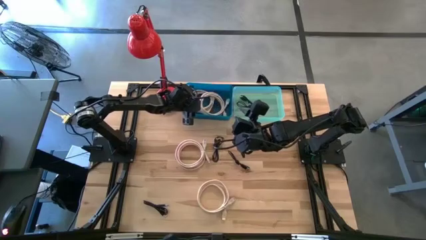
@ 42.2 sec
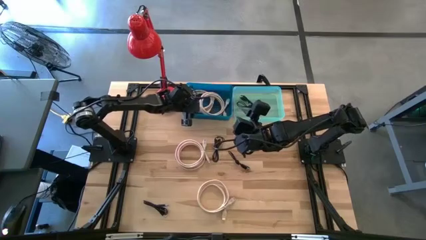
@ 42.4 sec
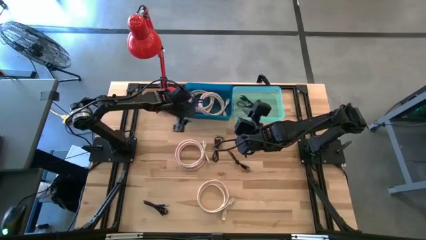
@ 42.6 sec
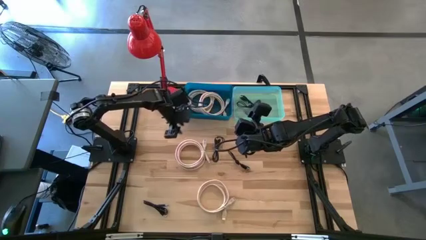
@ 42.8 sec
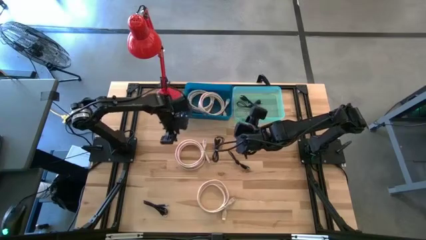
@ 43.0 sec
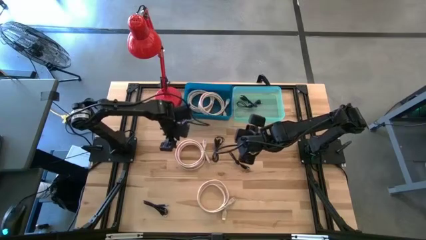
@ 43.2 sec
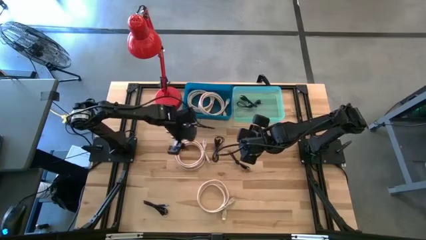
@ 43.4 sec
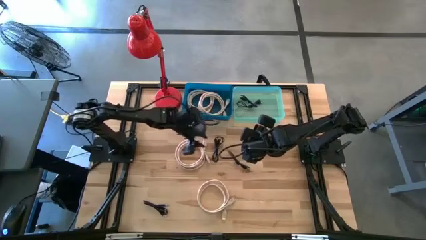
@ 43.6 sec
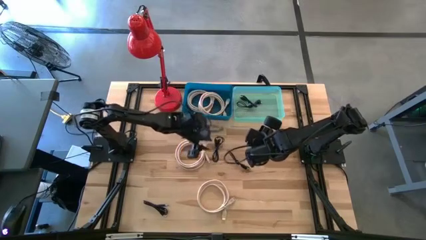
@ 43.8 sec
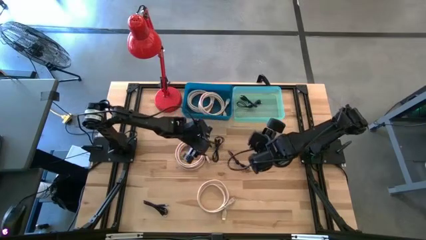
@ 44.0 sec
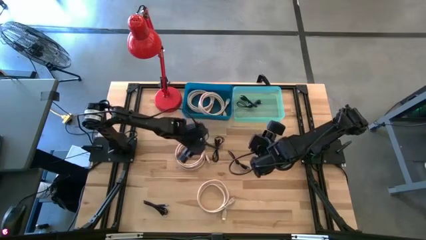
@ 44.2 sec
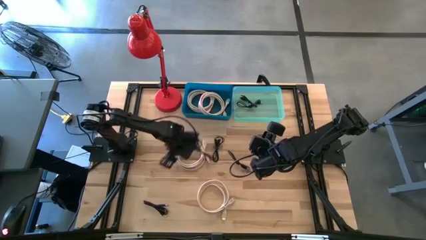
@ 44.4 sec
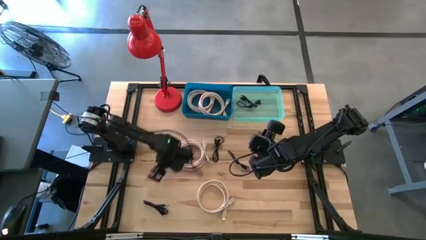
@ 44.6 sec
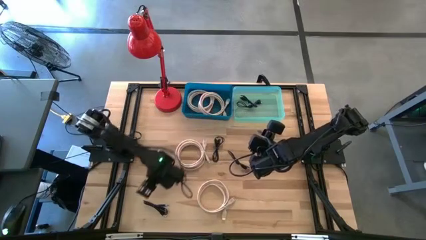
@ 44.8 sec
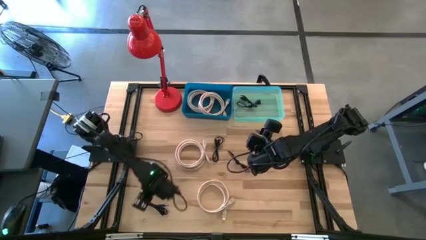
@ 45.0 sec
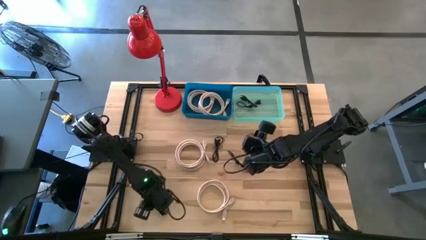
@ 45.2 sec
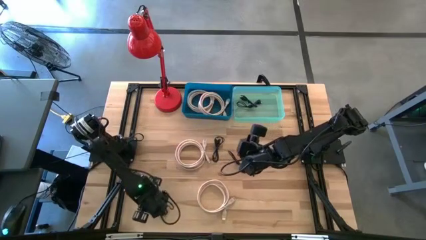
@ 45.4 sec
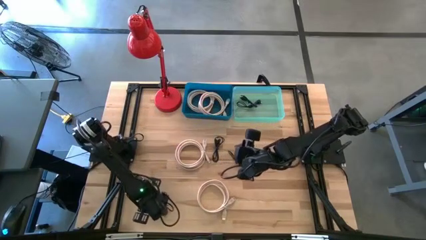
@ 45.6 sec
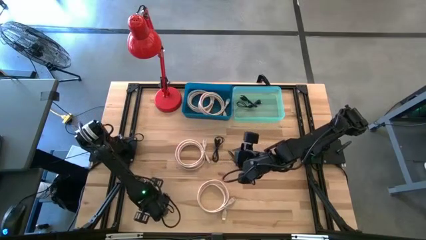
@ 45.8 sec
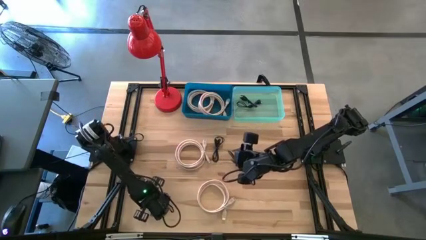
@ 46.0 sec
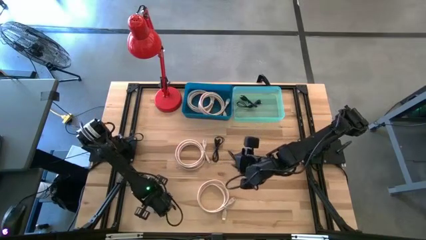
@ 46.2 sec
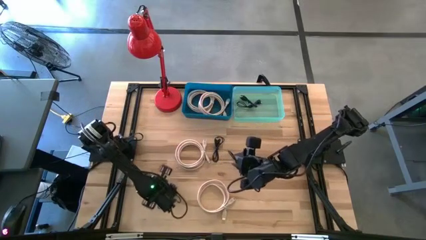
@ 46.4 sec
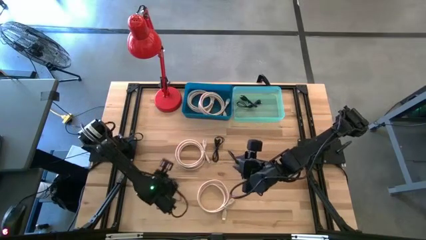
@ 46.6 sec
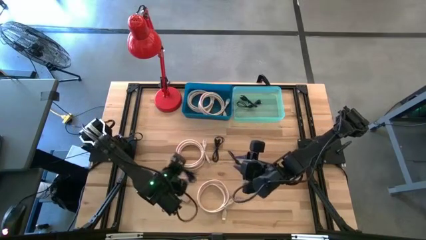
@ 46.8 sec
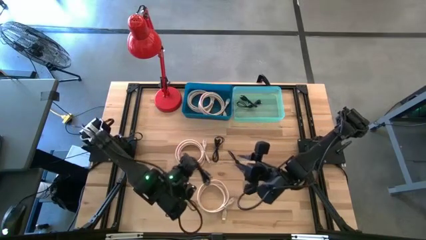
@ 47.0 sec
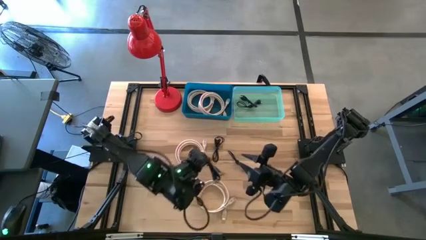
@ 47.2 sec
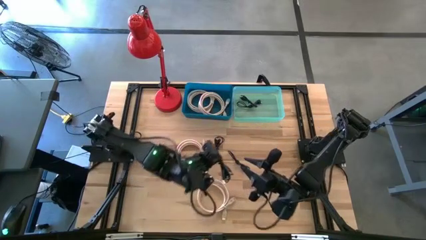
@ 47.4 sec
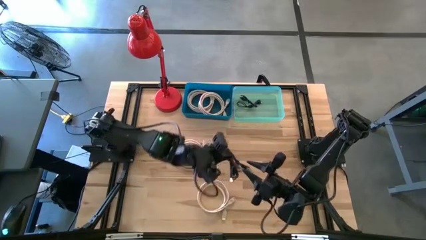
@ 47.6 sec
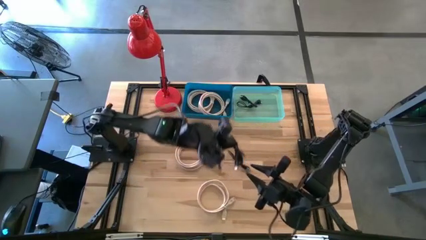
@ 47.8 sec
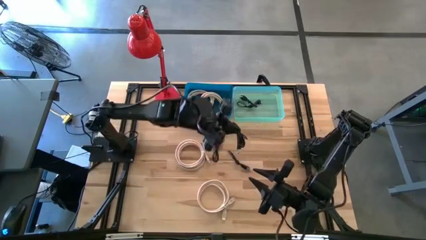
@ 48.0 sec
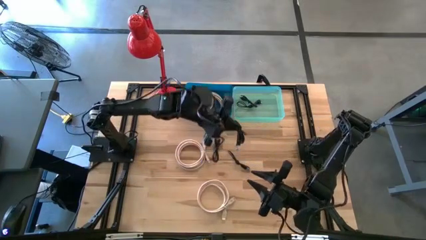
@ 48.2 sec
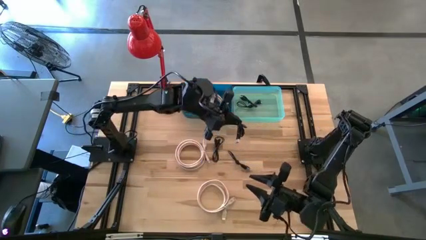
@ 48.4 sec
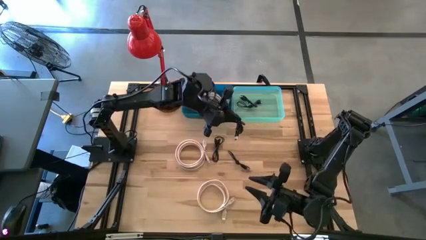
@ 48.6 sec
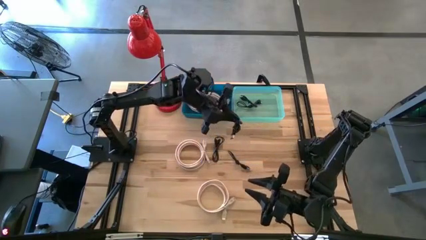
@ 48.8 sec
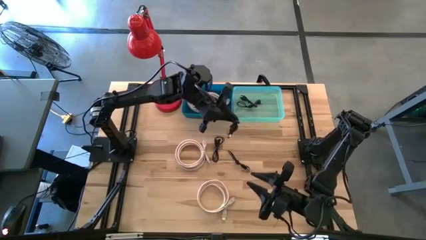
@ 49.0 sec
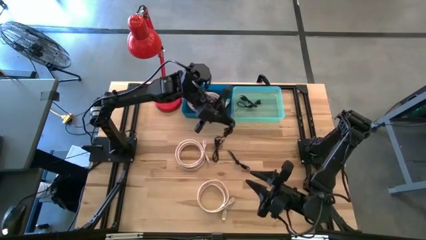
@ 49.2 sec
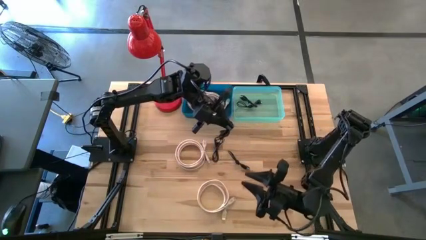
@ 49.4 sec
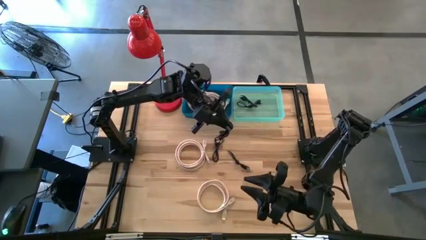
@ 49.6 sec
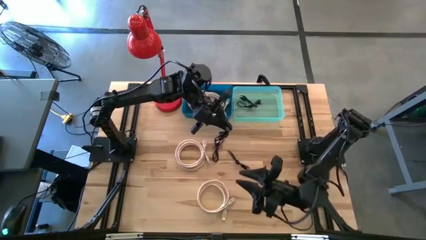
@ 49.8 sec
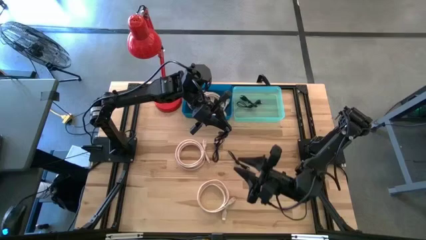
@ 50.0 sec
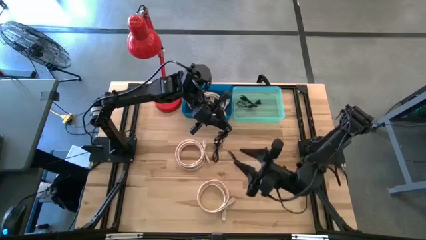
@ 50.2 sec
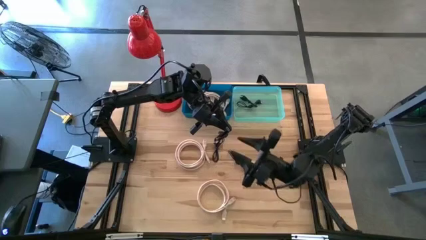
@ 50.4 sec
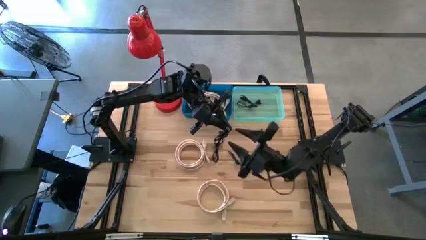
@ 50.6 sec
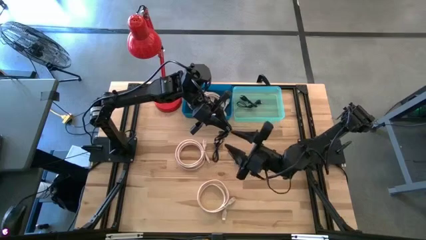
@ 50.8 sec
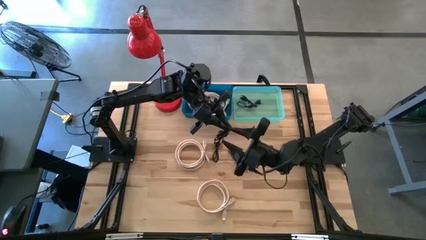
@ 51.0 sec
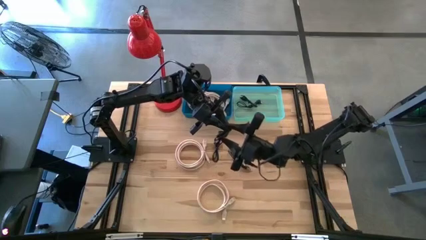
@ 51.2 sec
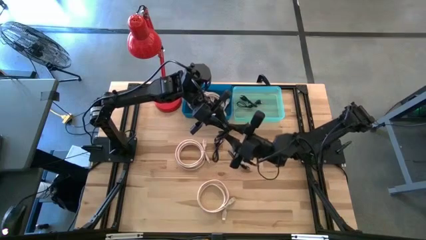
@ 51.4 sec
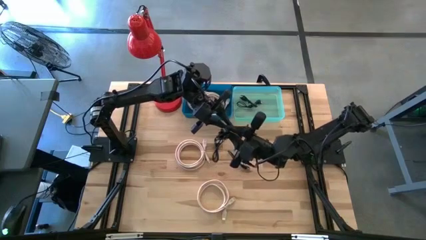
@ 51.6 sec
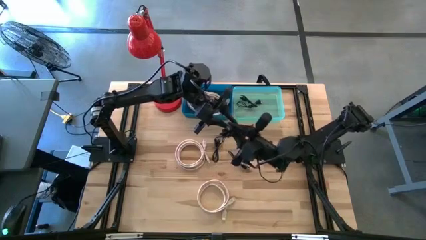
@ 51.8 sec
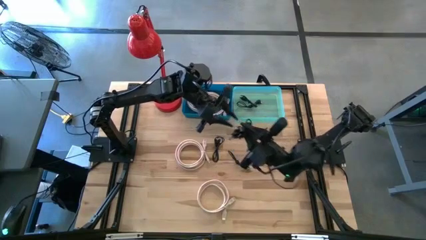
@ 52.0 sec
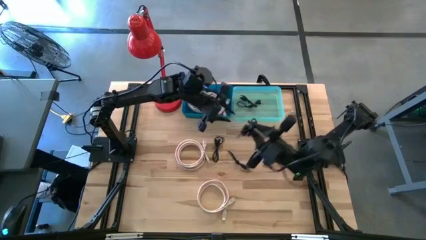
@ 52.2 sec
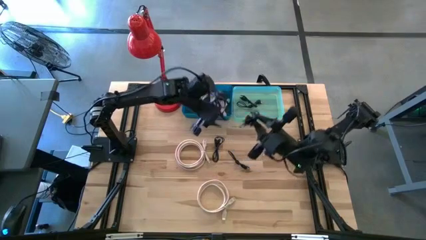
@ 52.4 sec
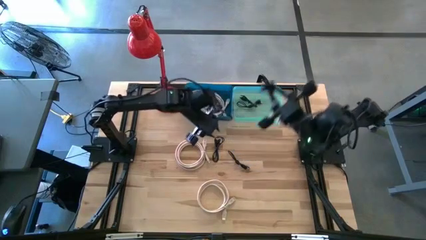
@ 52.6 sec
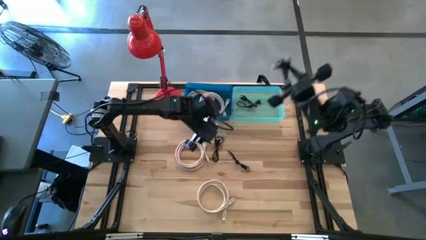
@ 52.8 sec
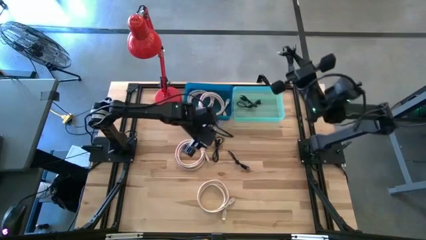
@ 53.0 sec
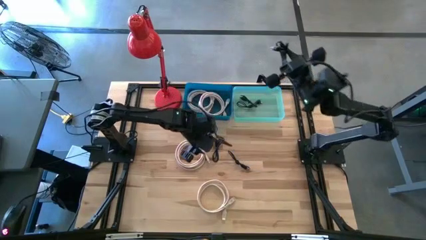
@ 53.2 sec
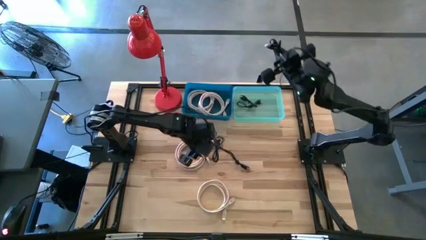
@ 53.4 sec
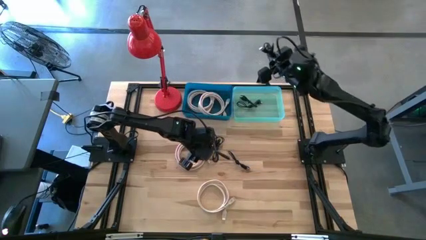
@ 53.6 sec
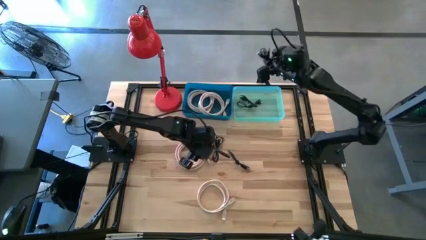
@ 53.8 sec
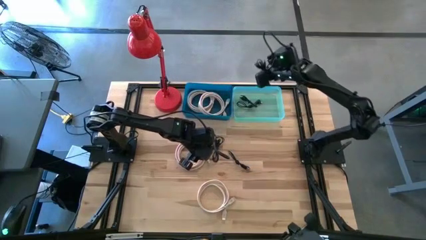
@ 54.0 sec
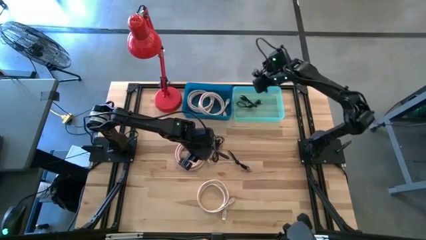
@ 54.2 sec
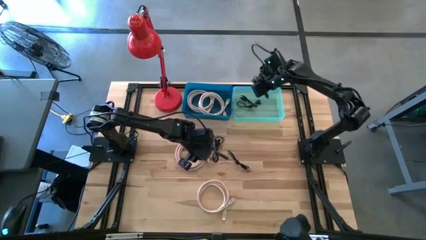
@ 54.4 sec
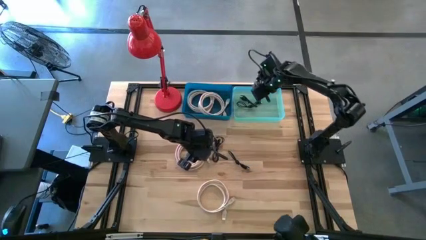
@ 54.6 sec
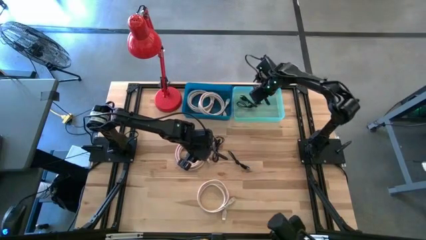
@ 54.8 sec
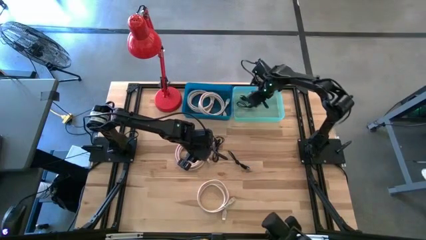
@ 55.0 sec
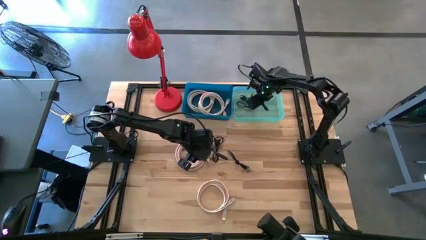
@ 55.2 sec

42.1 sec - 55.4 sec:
Task: Pick & Place USB Port
Put the black charger cable into the green bin

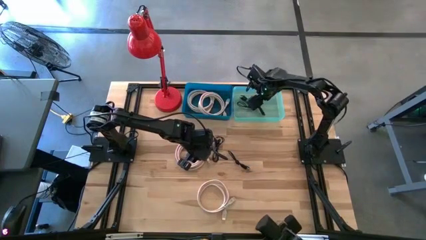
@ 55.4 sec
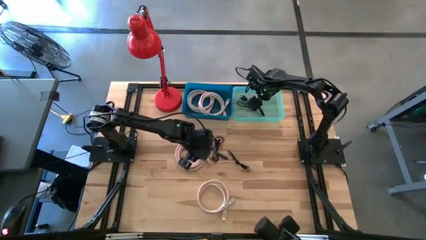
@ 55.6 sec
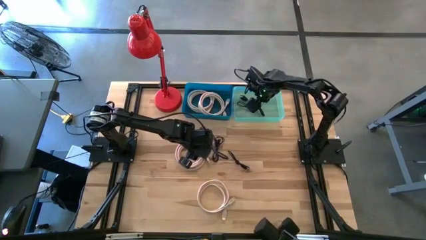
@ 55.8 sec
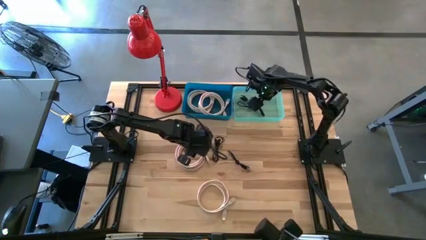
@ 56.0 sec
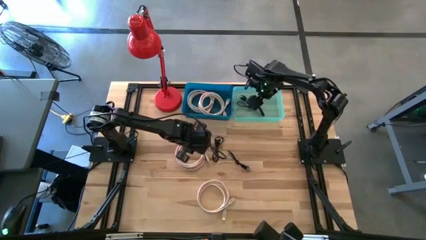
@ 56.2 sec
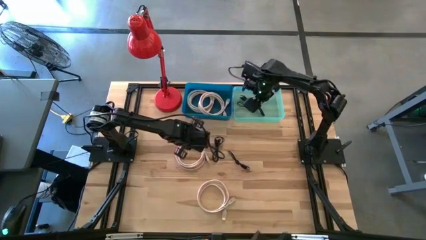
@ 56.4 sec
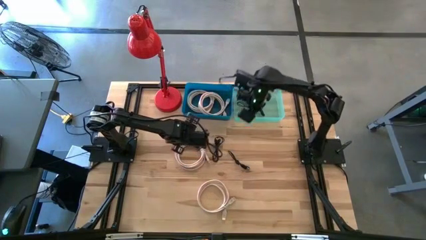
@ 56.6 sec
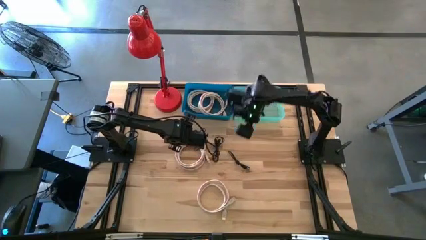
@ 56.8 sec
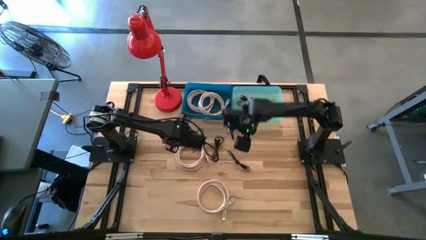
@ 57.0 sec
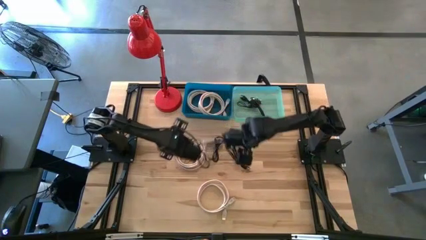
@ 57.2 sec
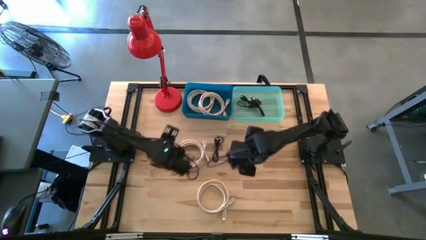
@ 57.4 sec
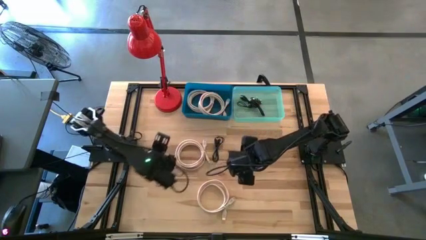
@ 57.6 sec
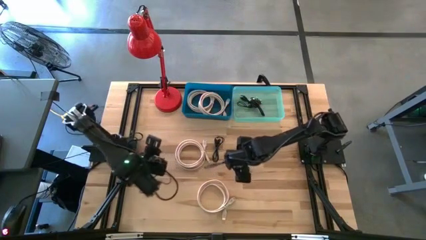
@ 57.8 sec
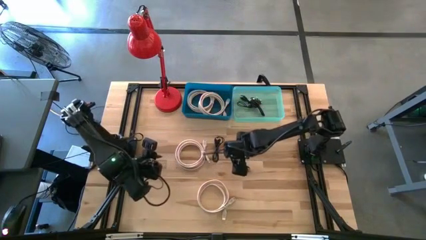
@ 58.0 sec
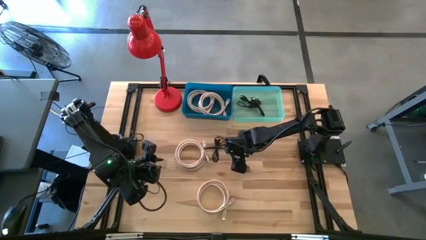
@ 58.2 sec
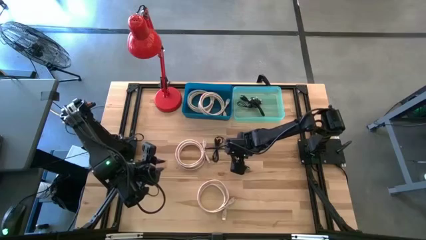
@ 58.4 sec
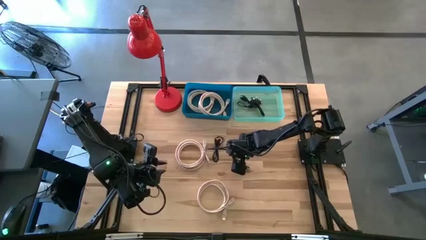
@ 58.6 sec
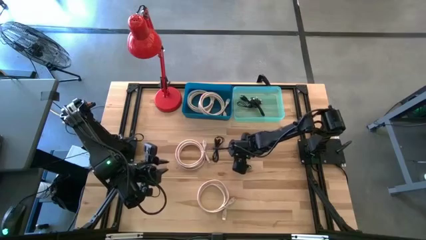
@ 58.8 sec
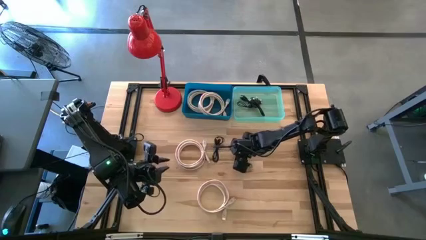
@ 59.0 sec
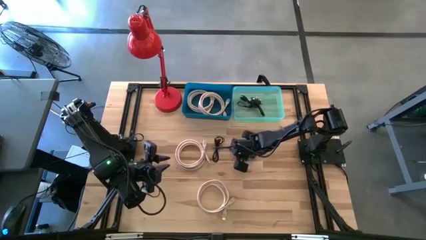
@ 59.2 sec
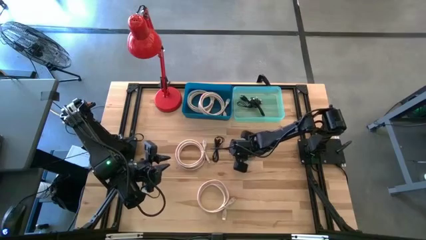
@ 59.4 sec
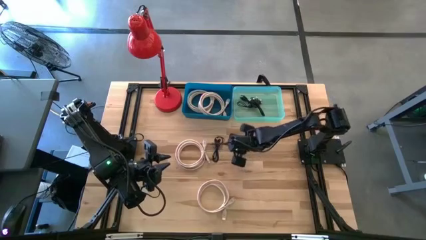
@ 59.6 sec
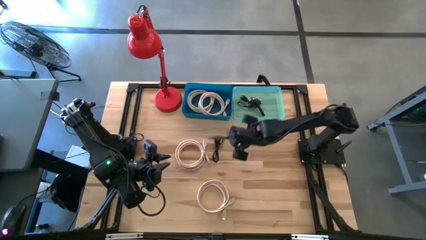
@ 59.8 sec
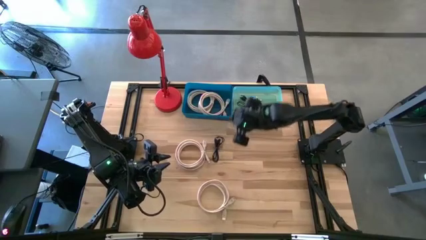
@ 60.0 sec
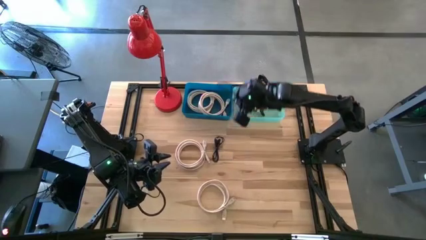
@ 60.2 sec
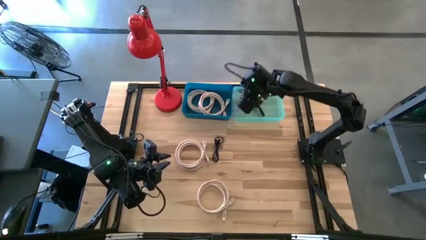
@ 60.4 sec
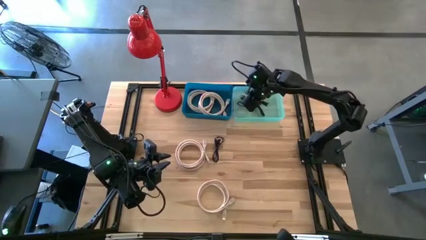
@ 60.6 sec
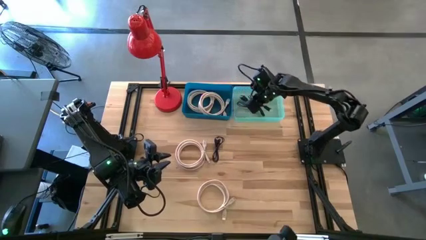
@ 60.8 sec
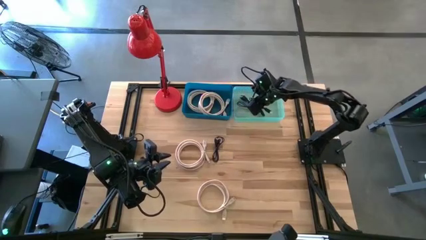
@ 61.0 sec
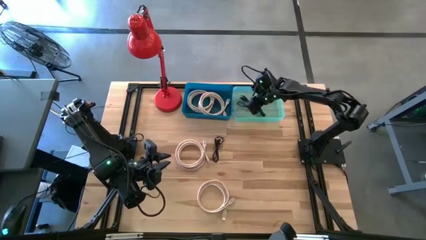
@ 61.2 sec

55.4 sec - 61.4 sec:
Put the black charger cable into the green bin
